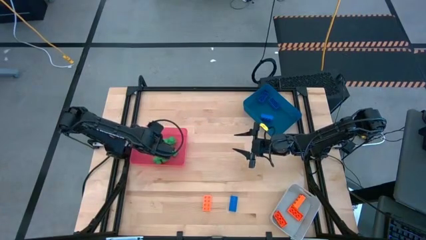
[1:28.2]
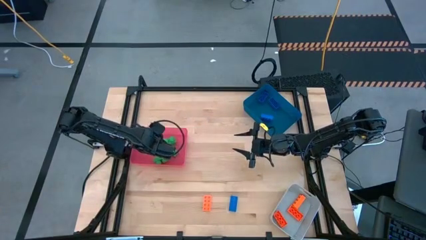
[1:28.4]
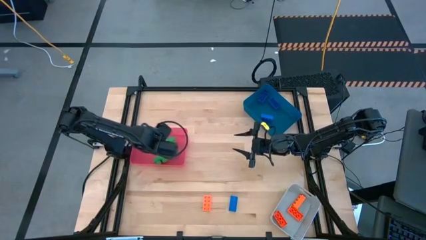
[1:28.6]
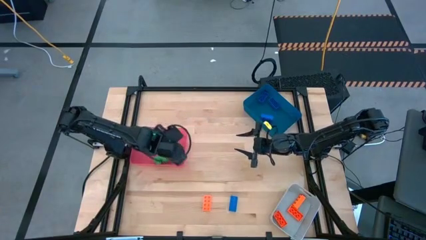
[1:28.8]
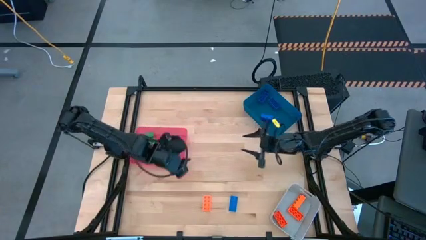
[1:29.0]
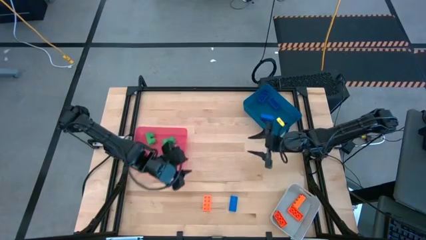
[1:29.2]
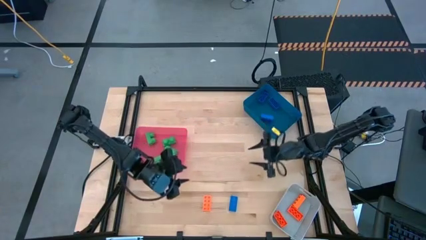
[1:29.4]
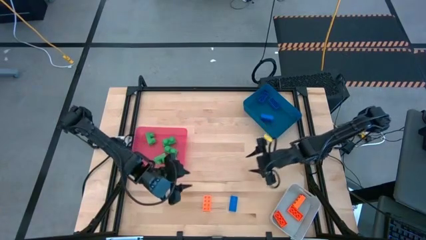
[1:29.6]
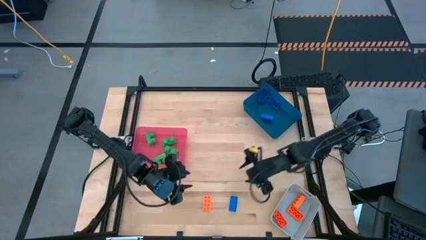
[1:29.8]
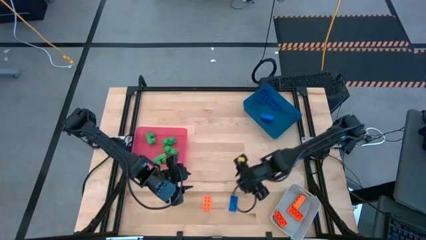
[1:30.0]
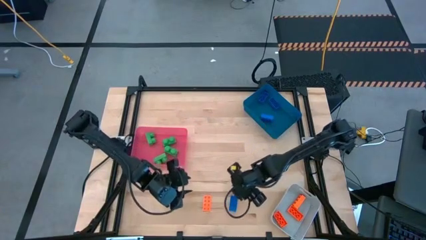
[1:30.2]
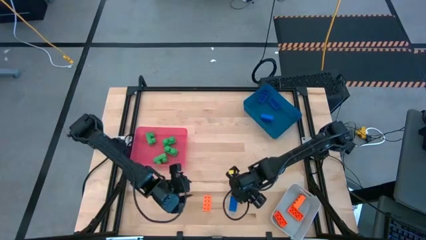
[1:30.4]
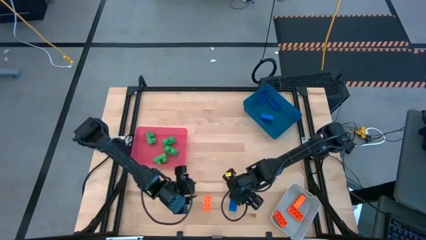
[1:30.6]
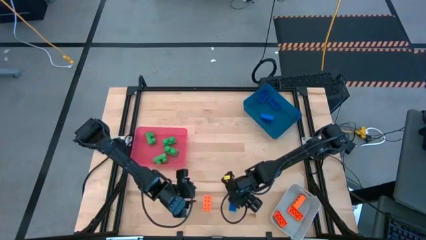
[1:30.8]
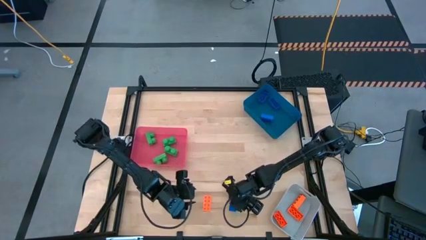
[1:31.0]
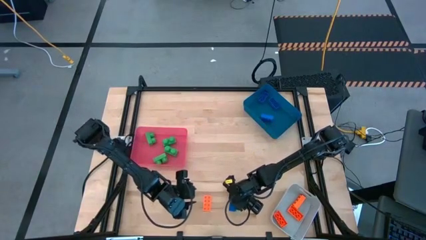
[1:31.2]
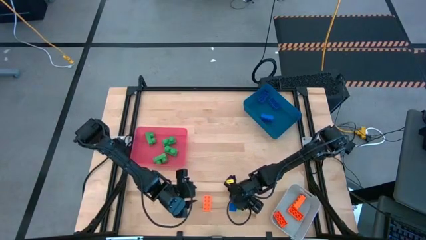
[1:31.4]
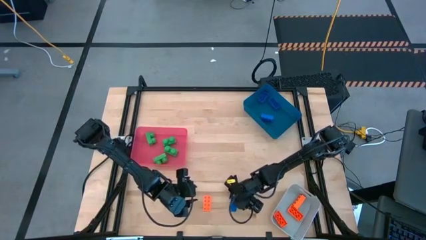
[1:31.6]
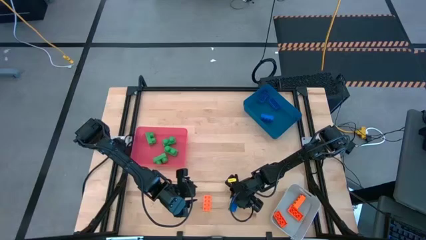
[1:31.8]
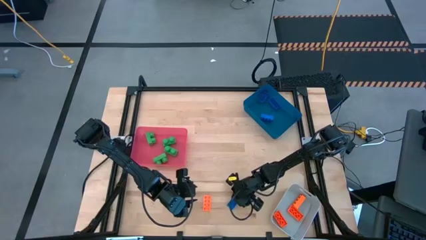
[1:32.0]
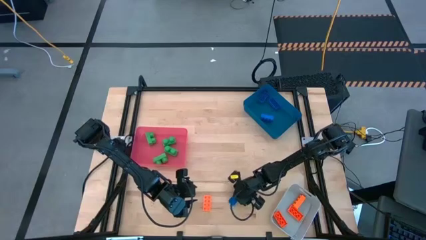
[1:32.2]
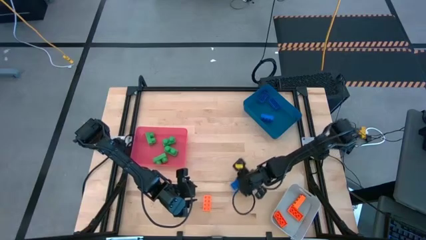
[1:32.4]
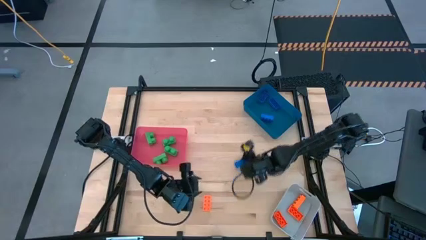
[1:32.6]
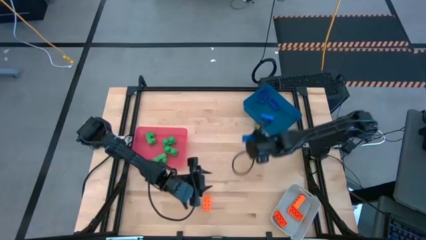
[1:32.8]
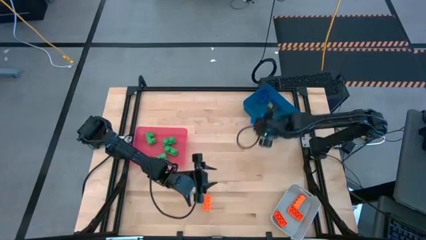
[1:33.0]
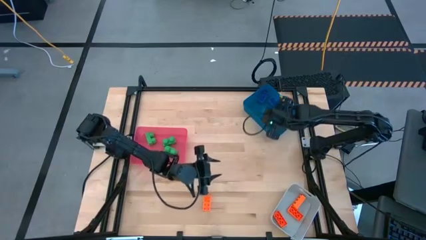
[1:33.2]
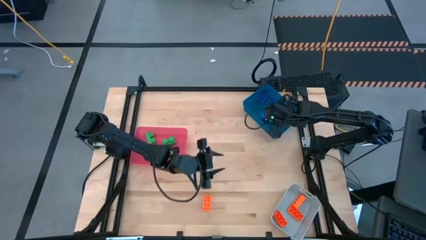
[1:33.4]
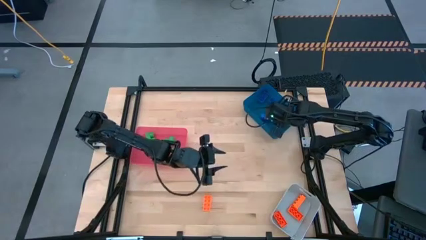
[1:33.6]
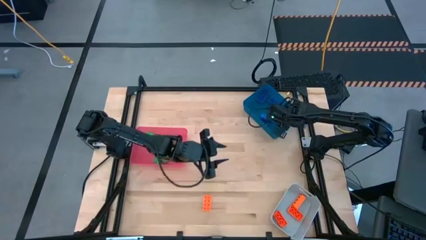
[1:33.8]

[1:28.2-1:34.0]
Task: Sort & place blocks by color
Put the blue game piece into the blue bin

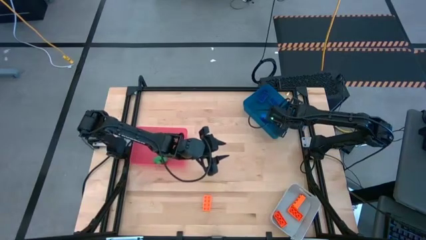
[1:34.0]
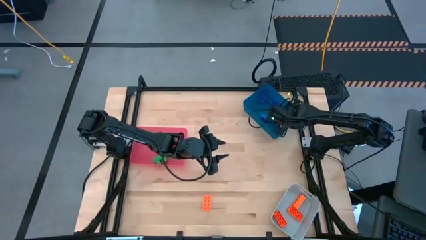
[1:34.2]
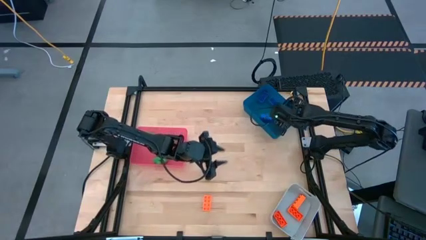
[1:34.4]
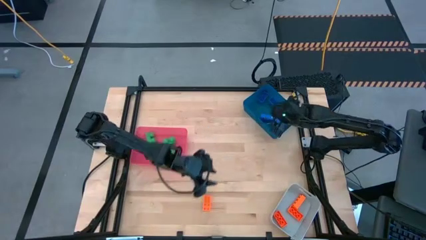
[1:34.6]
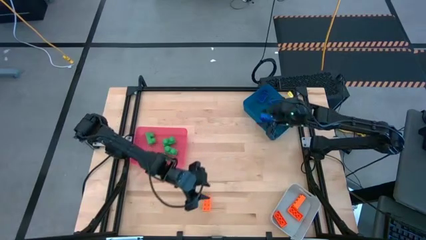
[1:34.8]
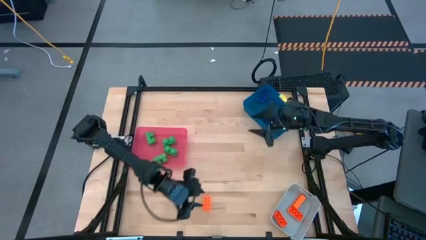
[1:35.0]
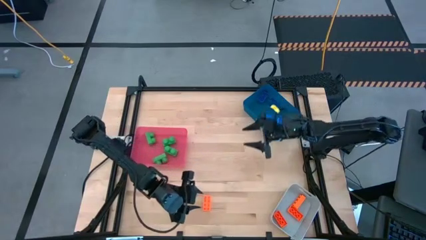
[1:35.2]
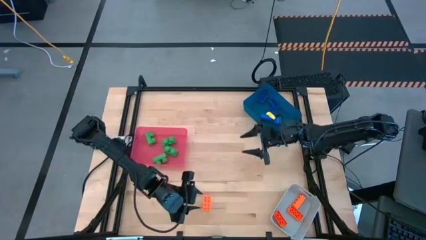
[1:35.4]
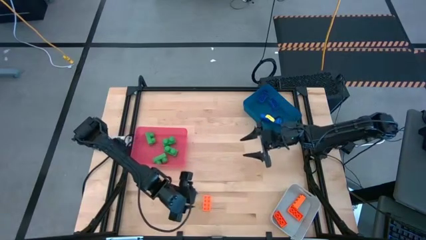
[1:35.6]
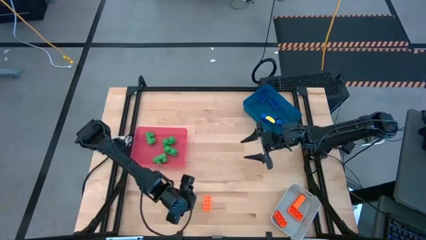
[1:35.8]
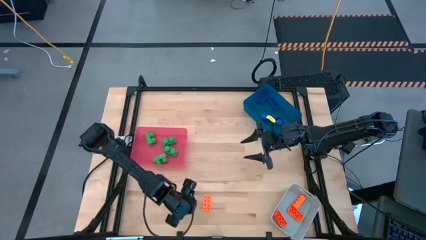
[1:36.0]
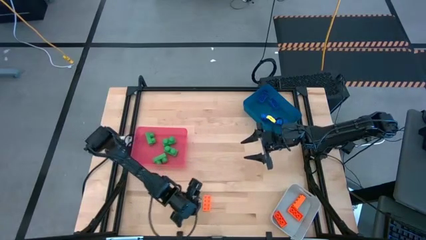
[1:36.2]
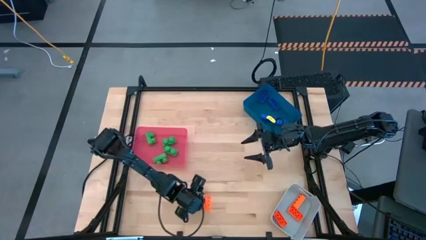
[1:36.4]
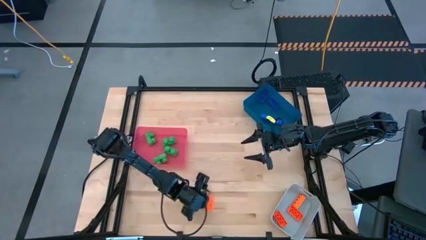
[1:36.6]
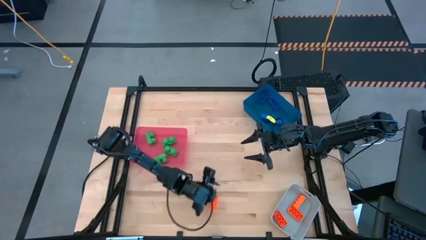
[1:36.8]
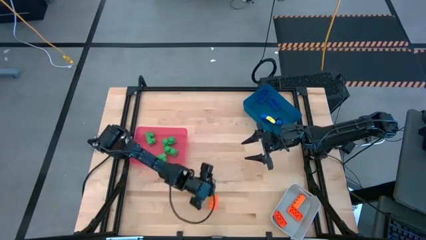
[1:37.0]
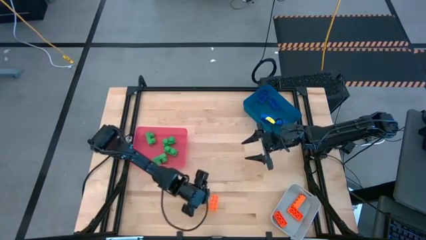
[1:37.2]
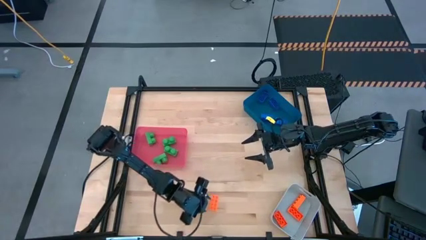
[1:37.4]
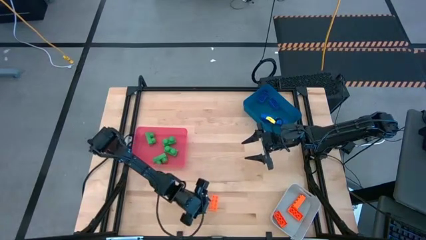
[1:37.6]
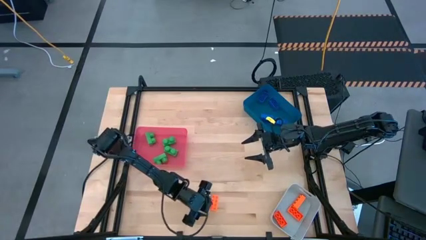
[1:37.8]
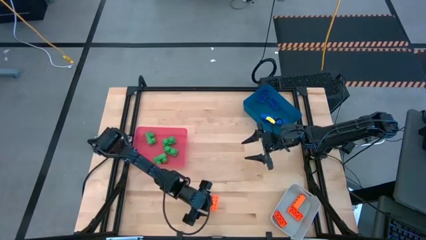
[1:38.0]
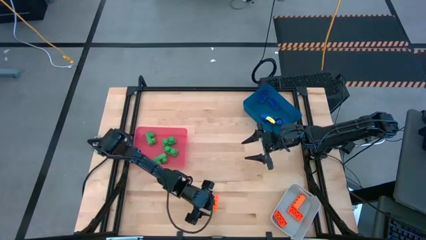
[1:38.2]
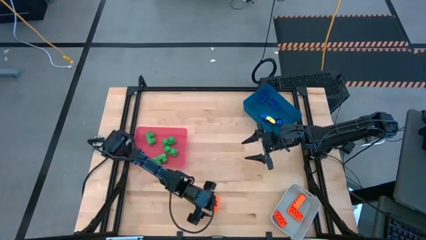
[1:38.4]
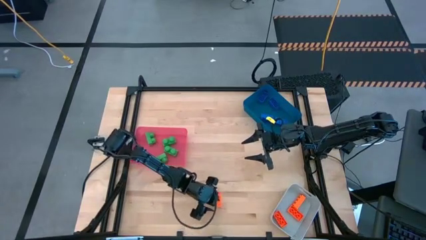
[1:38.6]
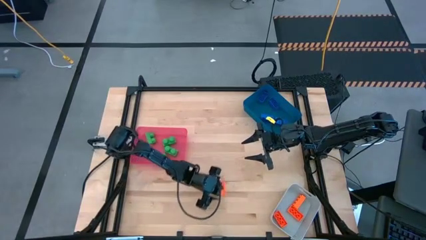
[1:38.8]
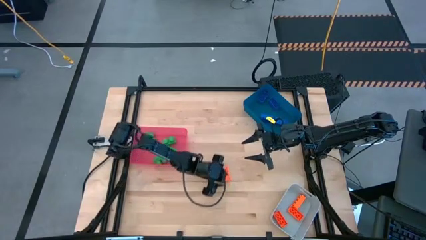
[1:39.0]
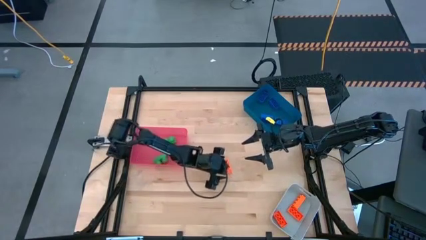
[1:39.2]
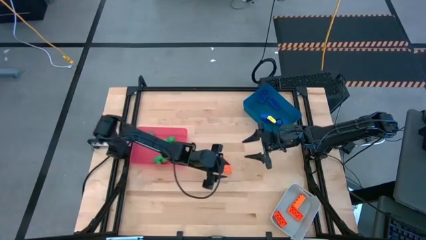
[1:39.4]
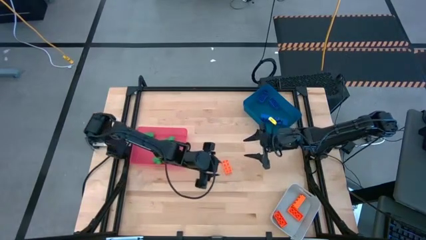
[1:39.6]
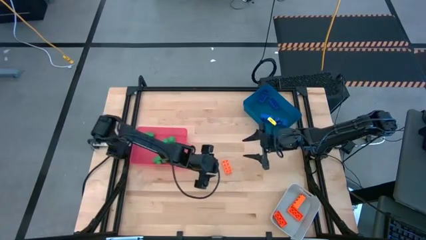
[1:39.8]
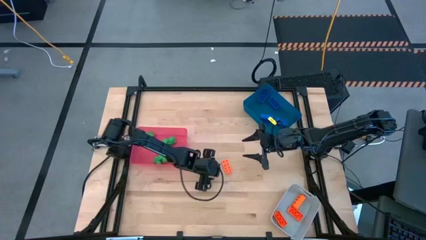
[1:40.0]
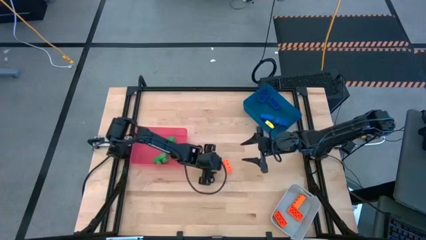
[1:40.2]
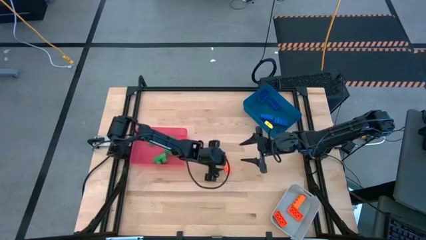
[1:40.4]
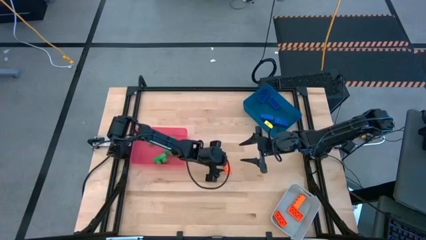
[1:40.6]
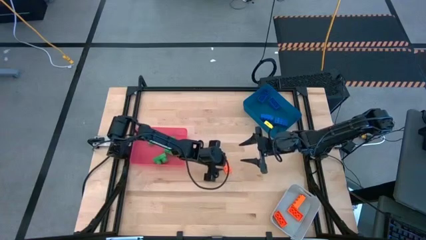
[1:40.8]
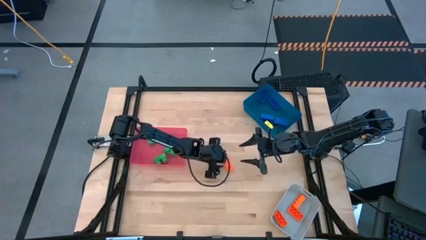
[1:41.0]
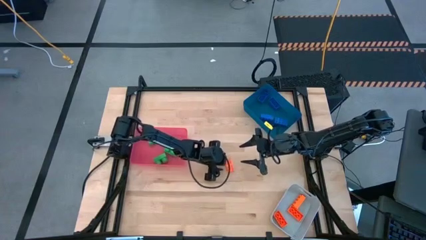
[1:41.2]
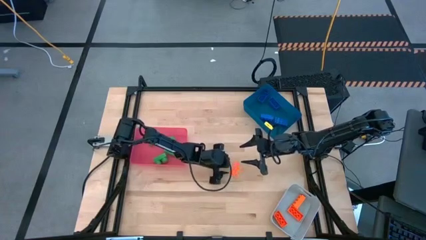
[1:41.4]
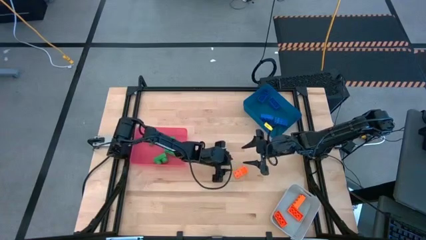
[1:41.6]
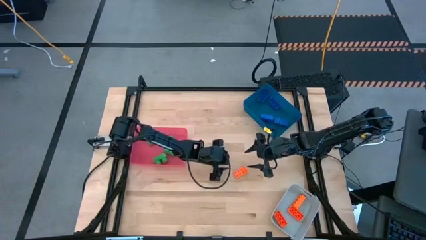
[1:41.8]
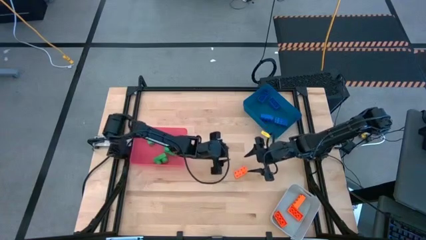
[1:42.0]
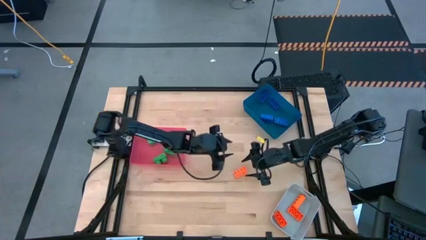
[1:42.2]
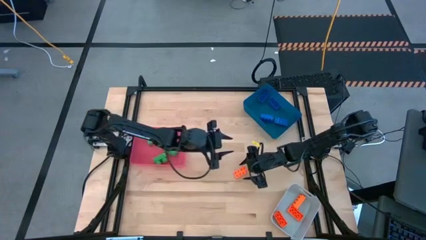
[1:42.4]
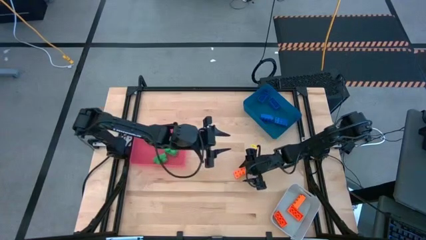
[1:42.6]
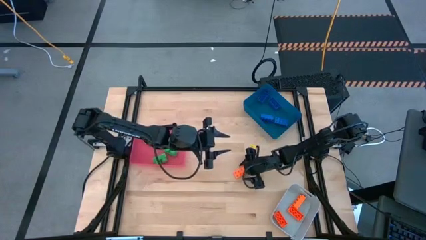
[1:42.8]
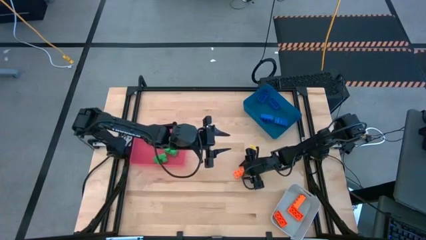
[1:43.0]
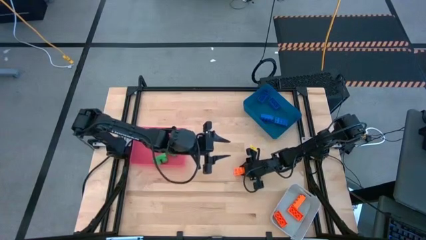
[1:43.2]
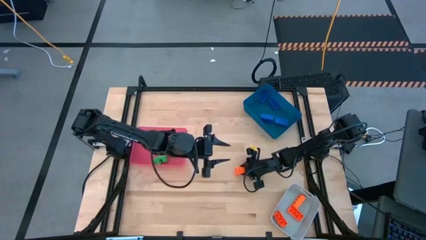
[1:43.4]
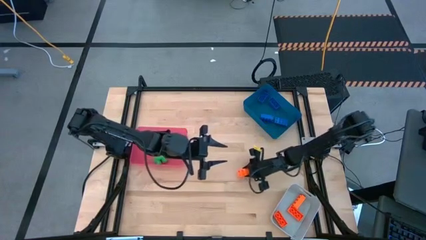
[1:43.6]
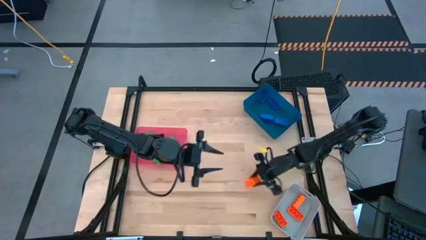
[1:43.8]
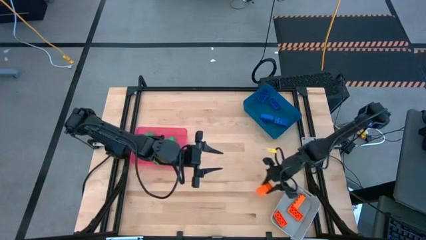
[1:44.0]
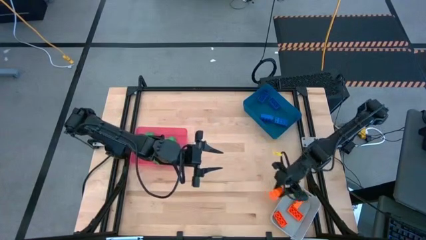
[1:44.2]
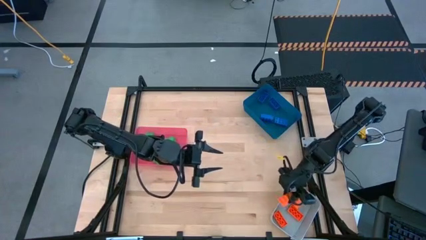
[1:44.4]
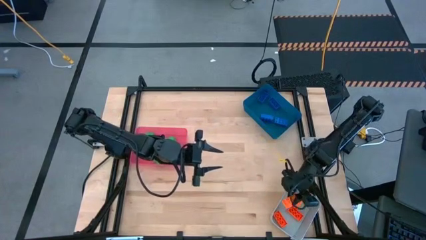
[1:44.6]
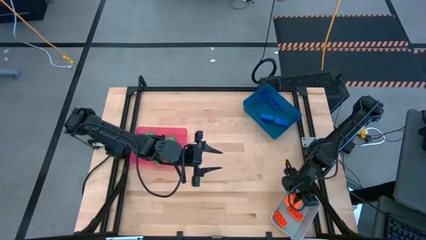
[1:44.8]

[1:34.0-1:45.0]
Put the orange game piece into the gray bin
